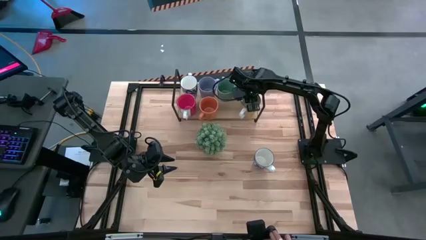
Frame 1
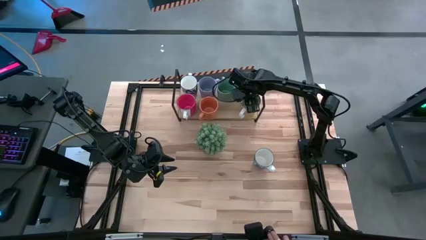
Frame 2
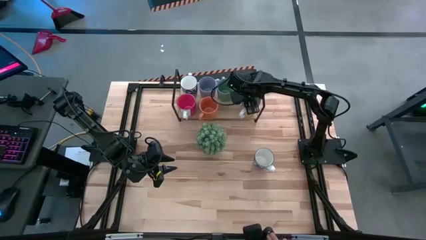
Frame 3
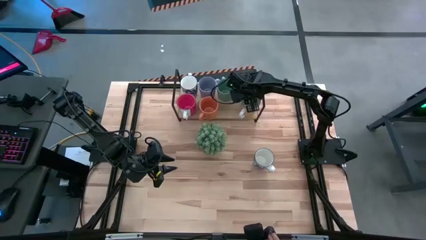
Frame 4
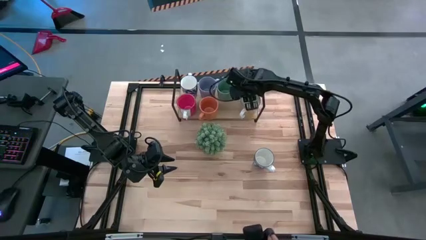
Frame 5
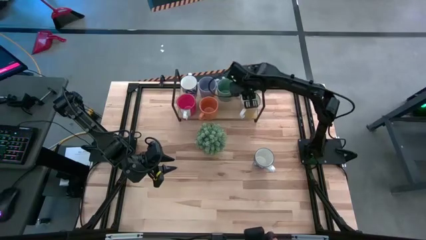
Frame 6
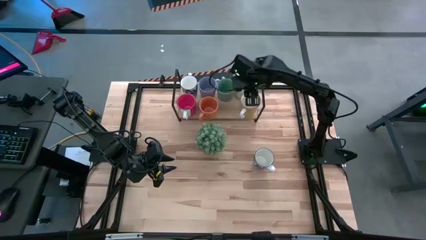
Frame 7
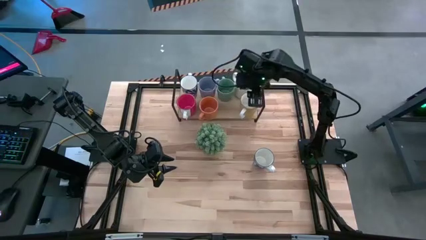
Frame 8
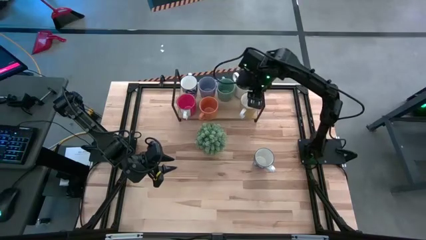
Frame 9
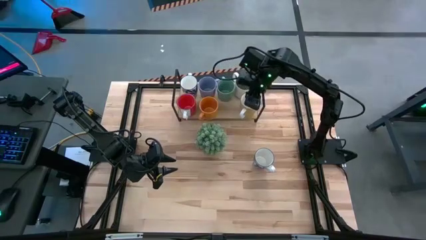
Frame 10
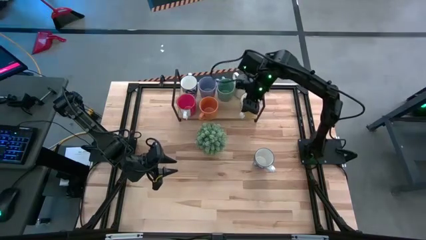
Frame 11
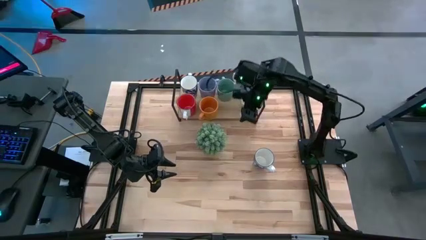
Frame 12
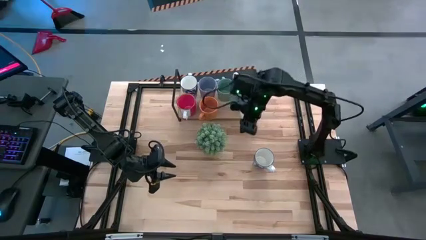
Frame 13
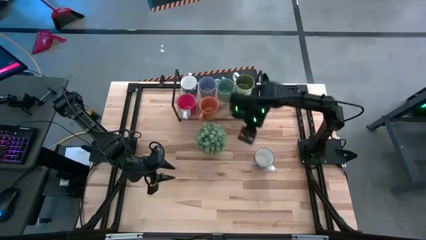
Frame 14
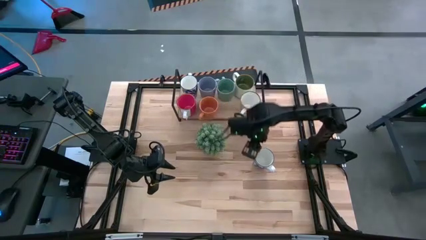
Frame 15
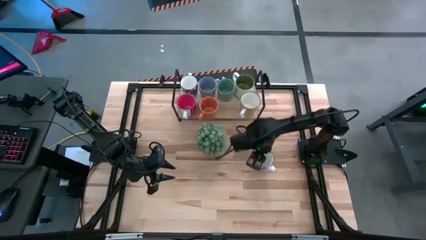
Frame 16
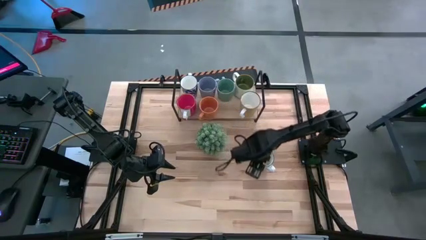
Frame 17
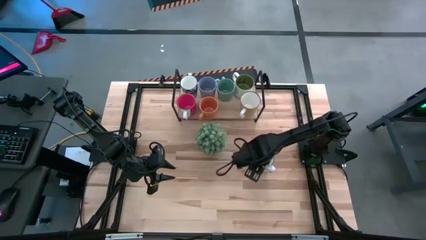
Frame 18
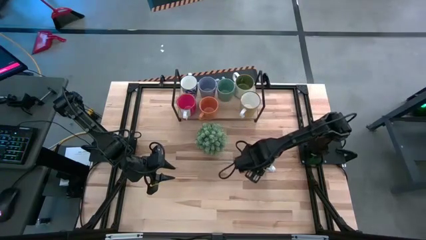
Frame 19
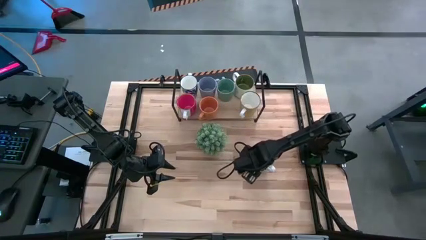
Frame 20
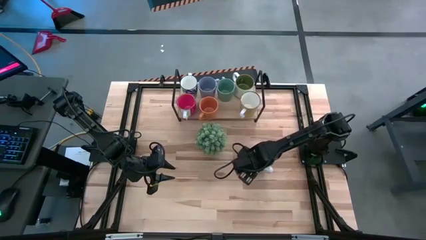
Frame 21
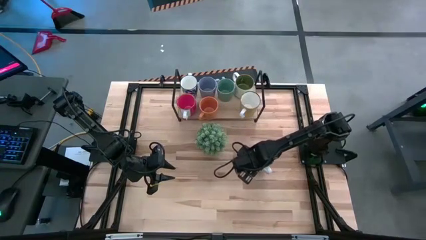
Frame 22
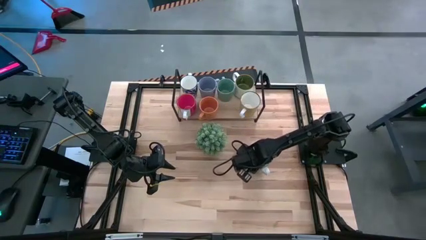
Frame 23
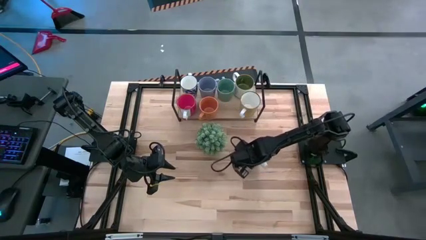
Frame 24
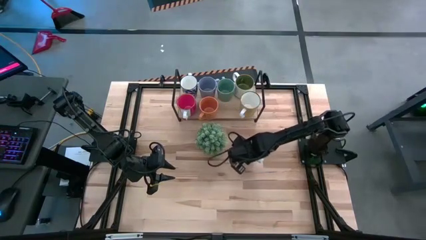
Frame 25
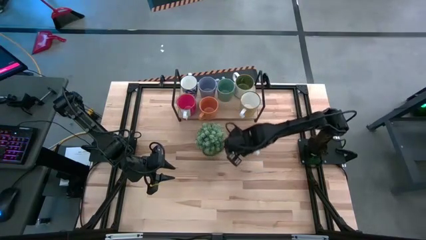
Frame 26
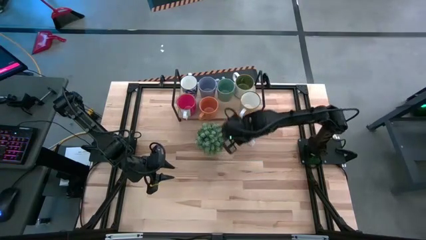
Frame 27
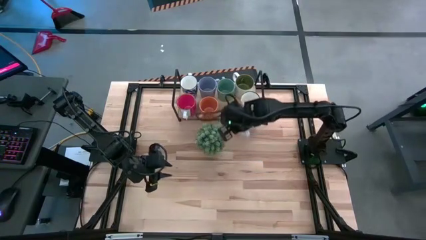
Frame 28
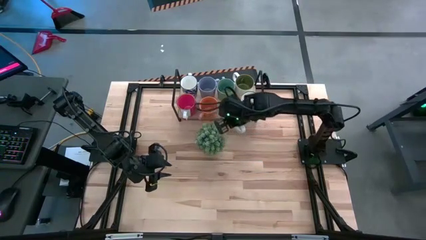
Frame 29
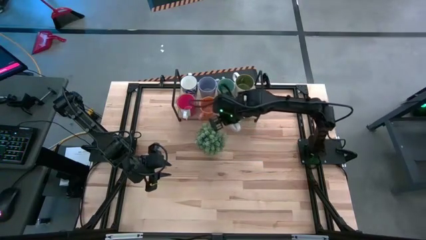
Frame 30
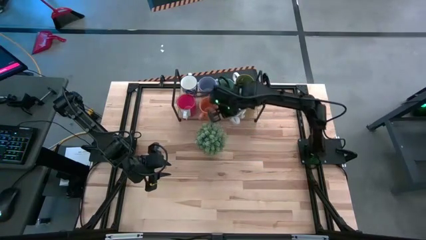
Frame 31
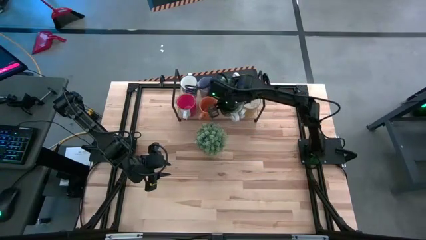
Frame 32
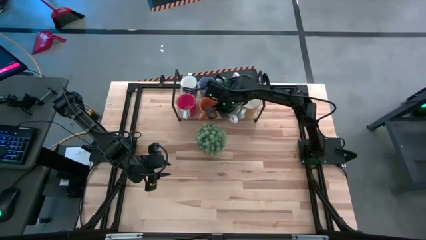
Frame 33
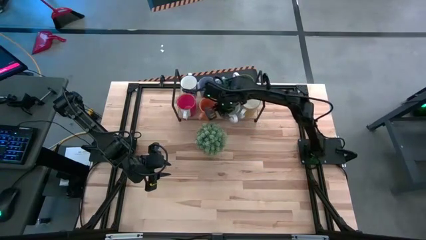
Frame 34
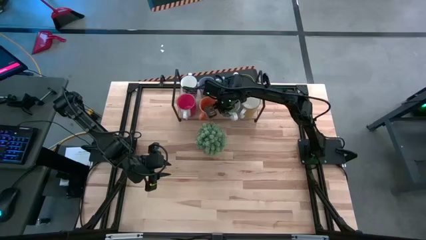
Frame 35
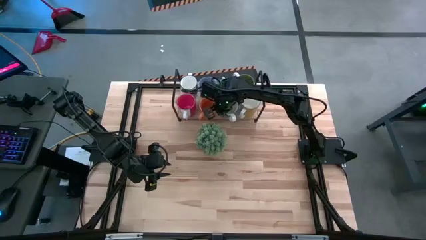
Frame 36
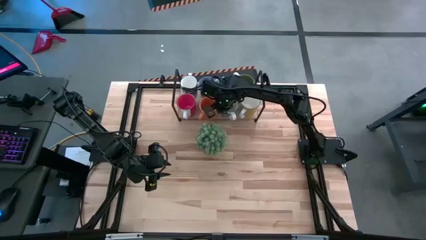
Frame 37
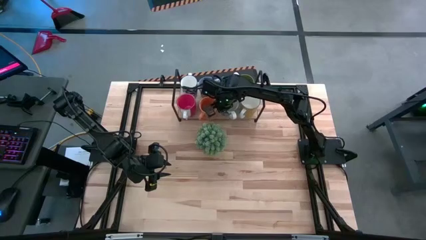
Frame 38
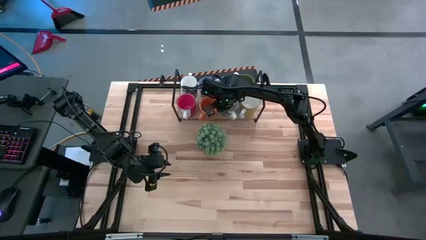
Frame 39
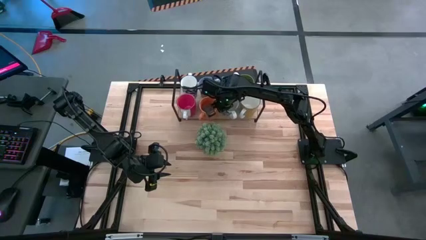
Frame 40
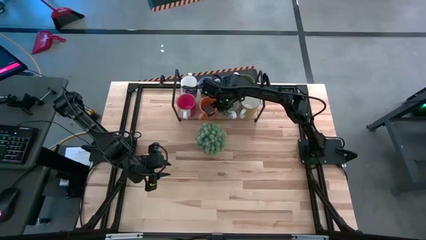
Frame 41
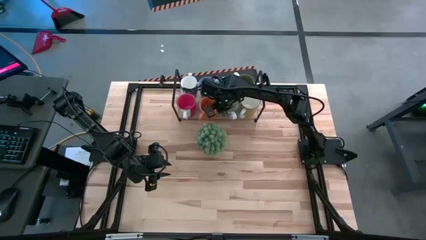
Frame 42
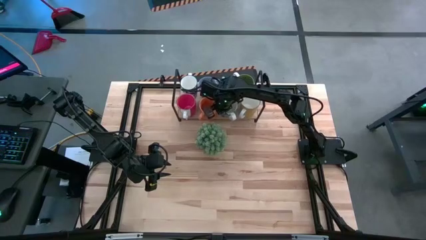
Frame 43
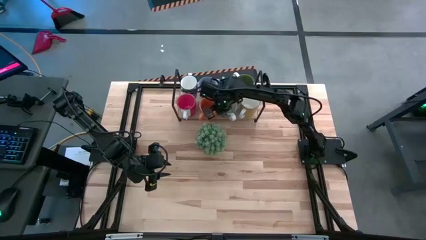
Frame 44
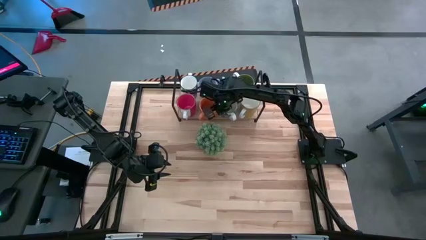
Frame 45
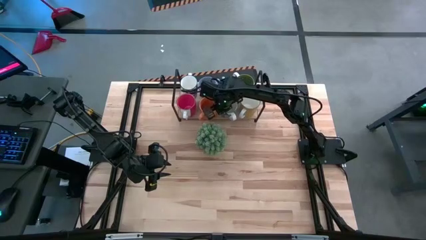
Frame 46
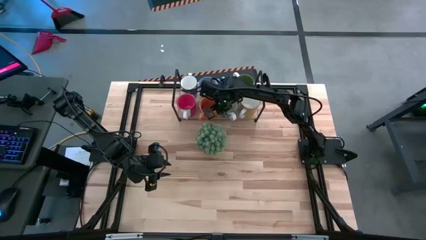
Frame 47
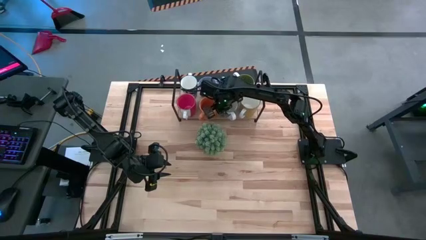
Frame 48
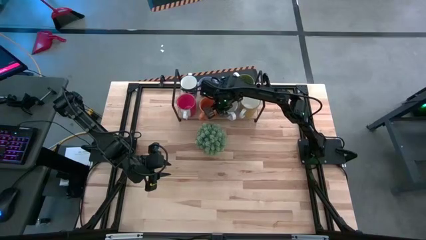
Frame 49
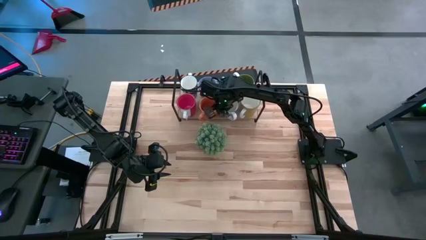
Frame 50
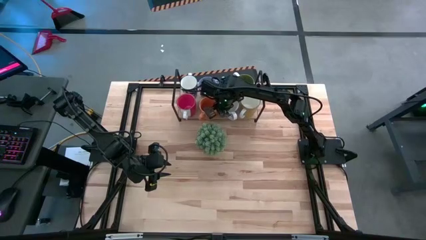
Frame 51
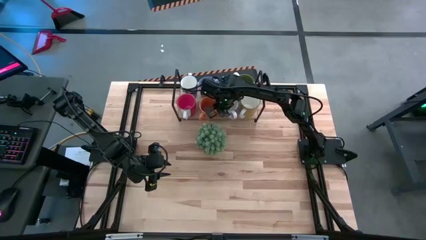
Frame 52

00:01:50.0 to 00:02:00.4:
Task: Place coffee mugs
Put the blue patterned mug on the shelf

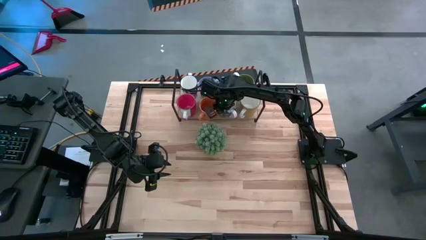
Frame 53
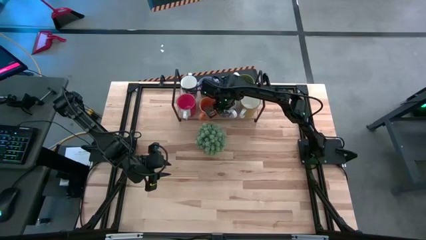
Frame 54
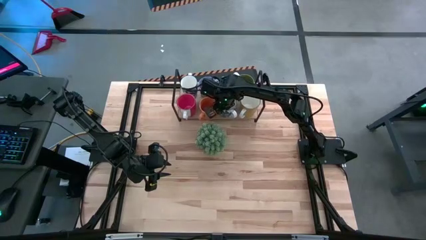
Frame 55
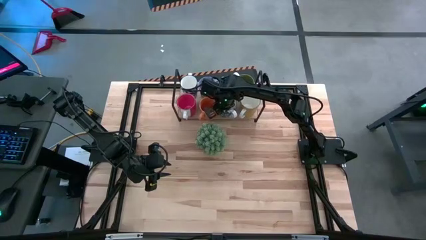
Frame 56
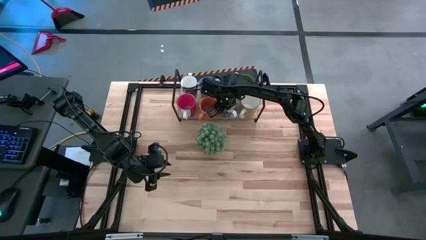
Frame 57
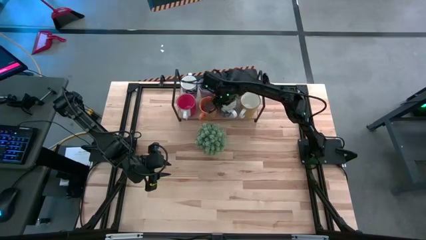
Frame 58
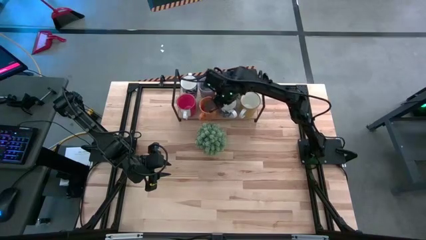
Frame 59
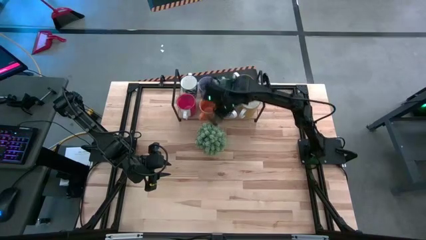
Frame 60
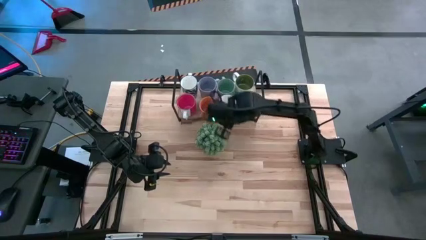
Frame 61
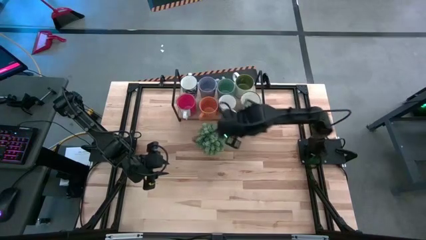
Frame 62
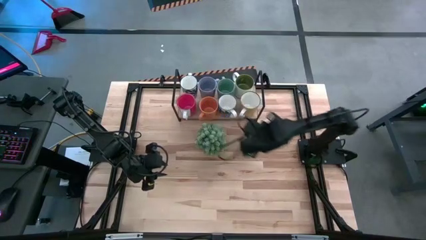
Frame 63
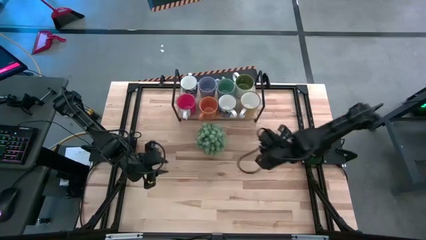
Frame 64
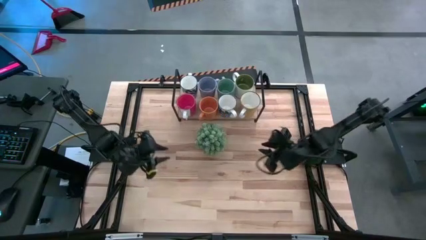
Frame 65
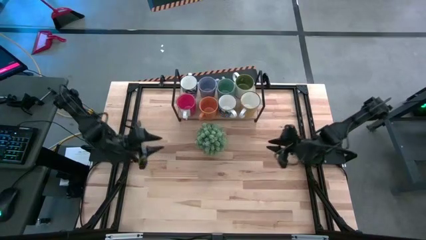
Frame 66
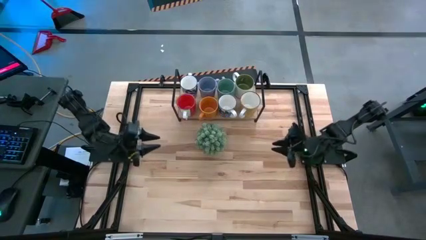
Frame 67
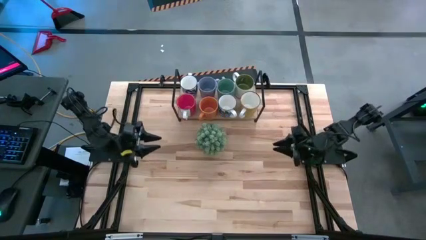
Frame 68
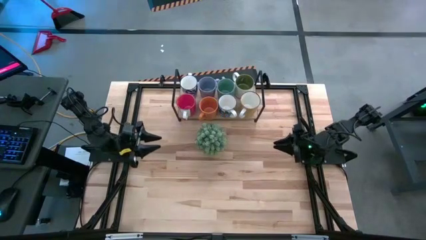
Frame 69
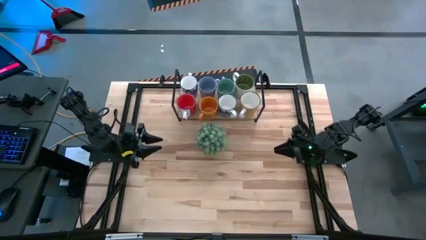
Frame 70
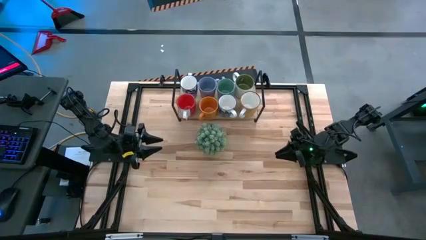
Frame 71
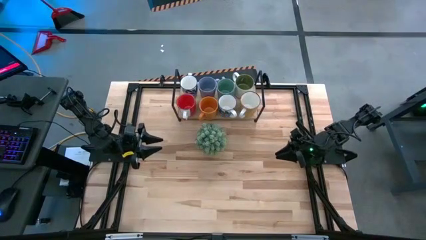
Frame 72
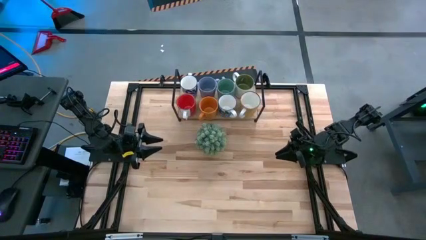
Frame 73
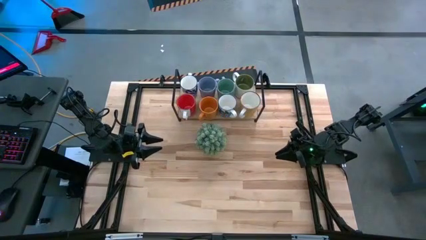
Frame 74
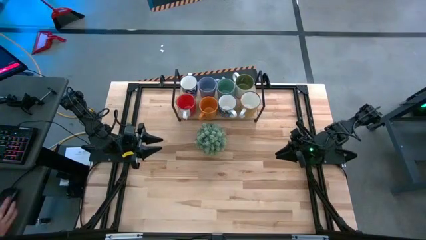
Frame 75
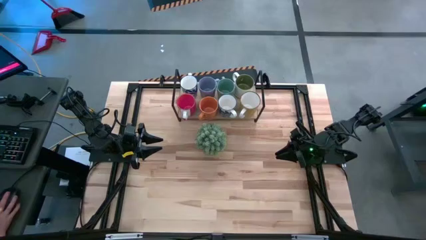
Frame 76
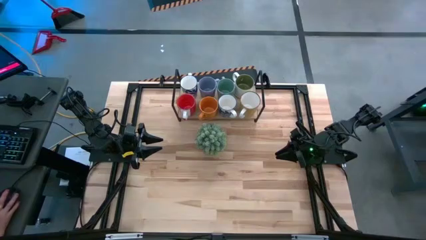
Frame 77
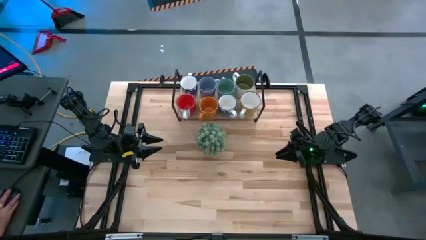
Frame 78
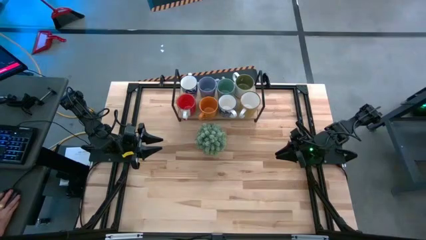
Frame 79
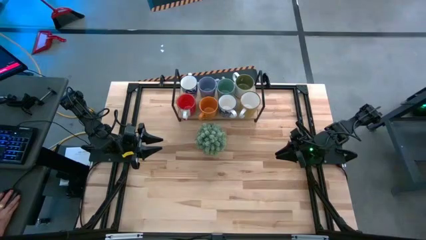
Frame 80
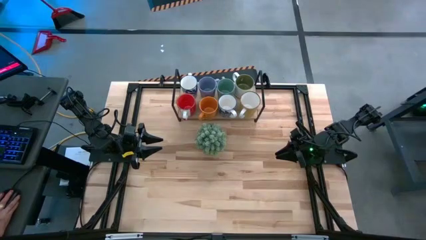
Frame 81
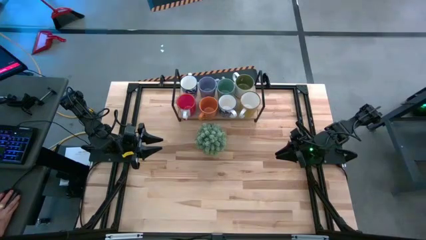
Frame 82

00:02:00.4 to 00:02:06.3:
Return to Home Position
